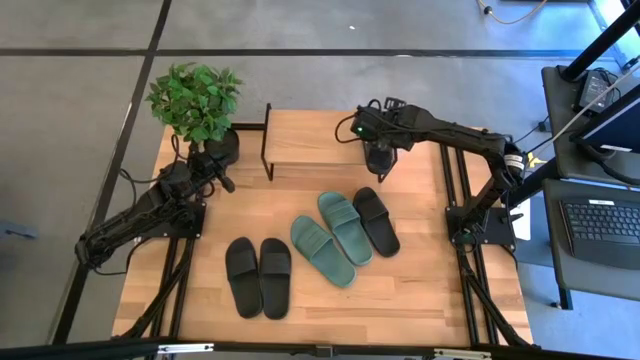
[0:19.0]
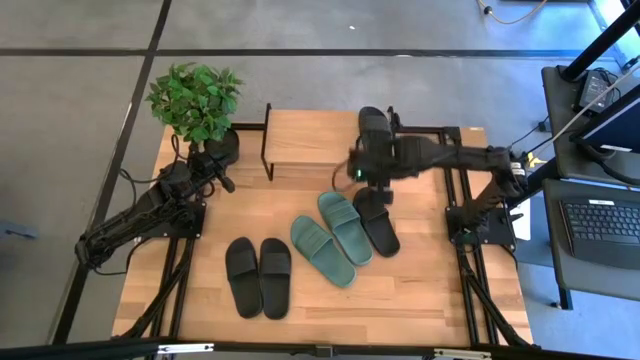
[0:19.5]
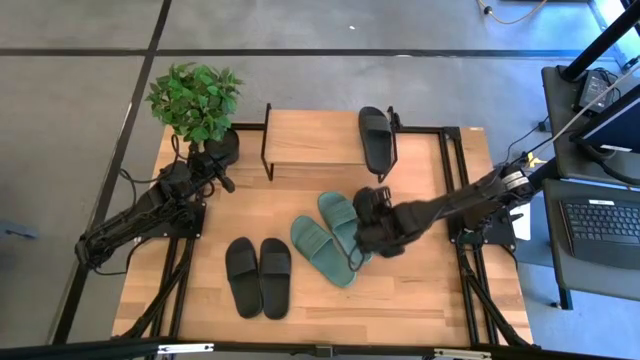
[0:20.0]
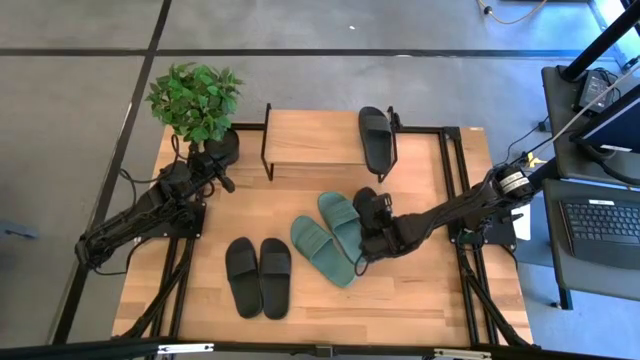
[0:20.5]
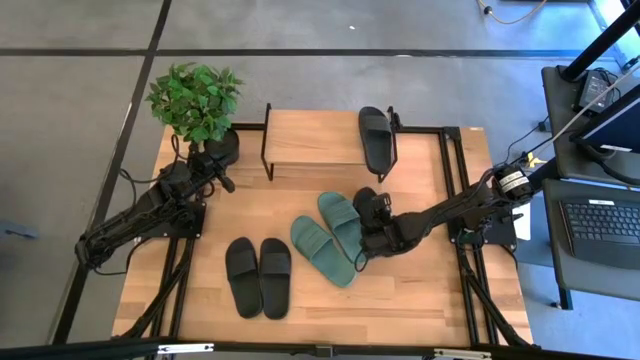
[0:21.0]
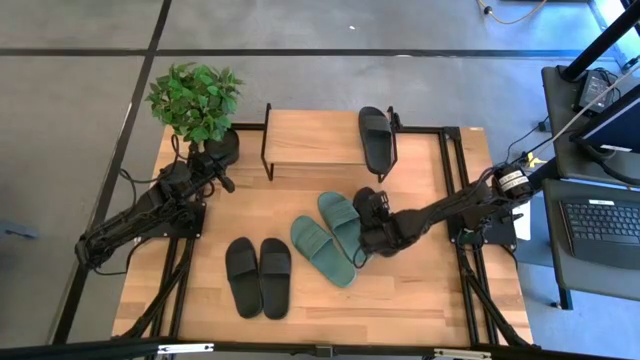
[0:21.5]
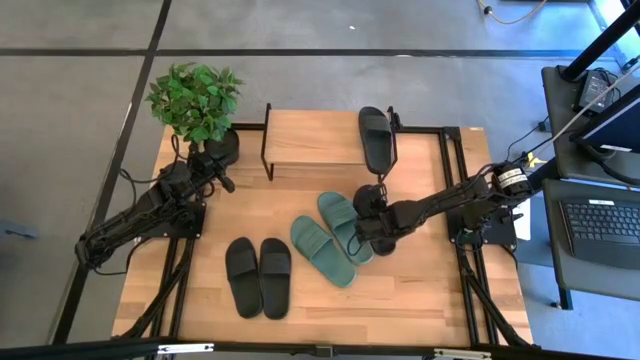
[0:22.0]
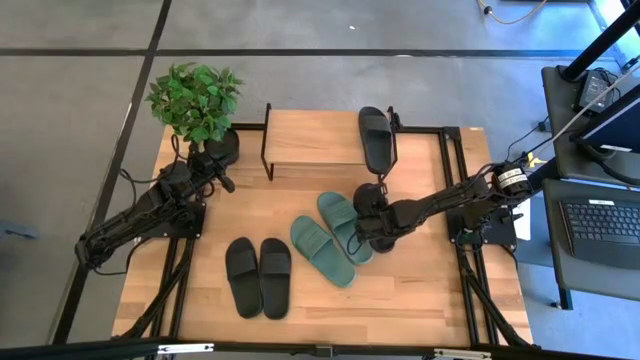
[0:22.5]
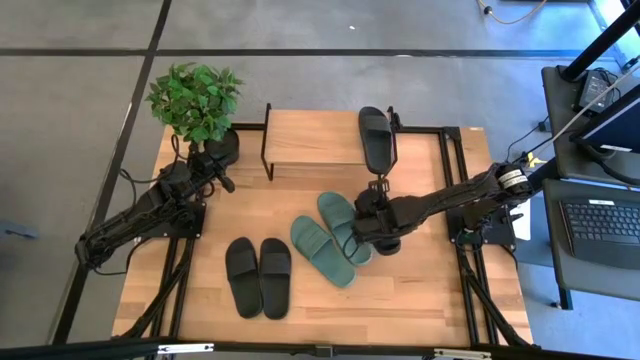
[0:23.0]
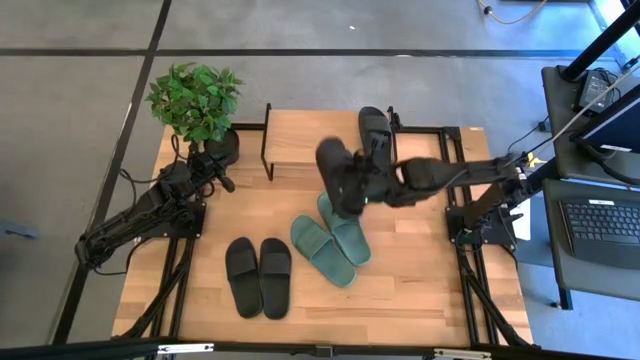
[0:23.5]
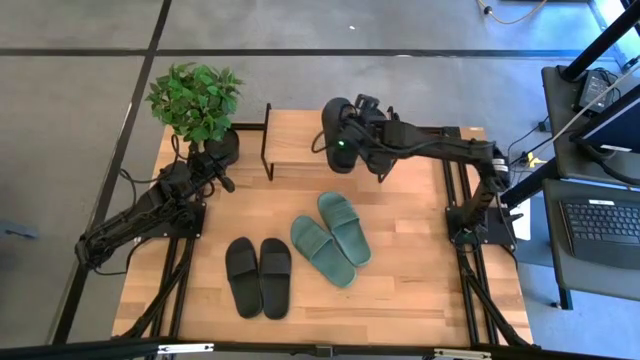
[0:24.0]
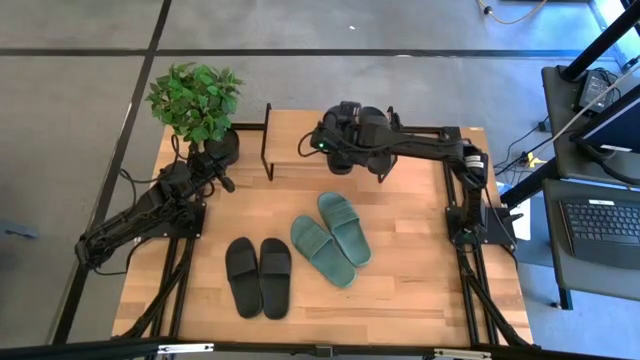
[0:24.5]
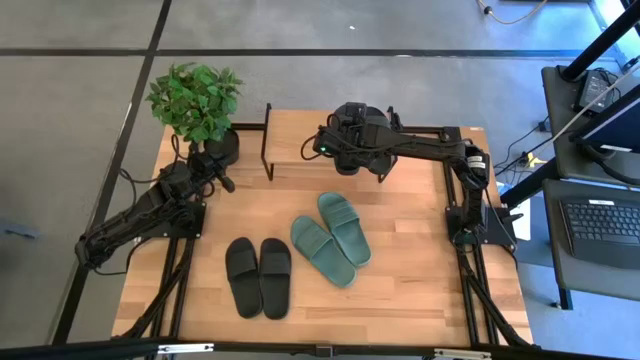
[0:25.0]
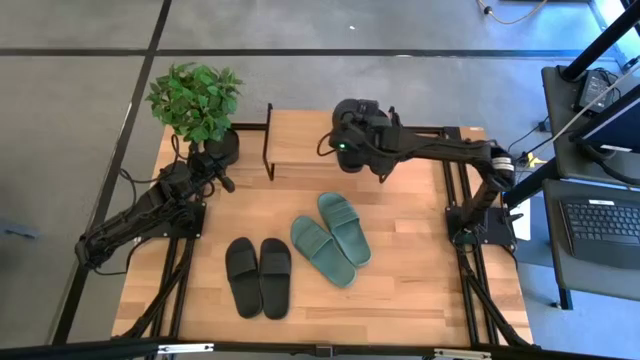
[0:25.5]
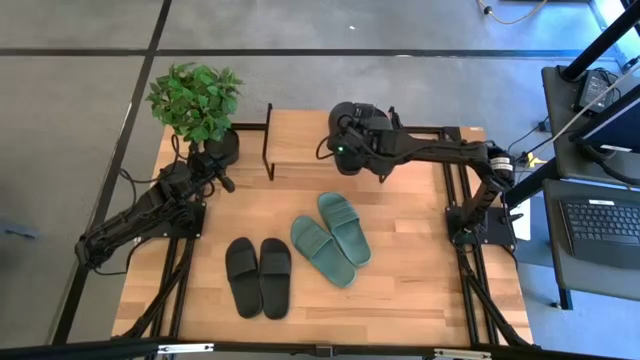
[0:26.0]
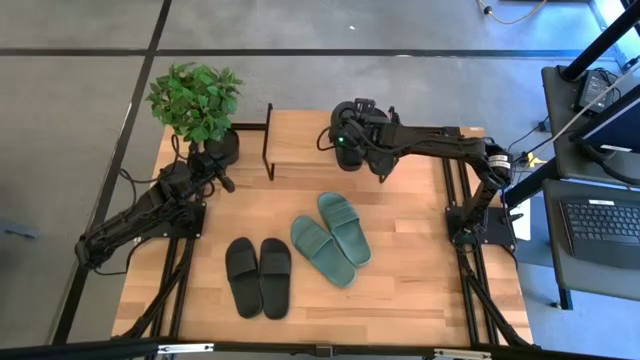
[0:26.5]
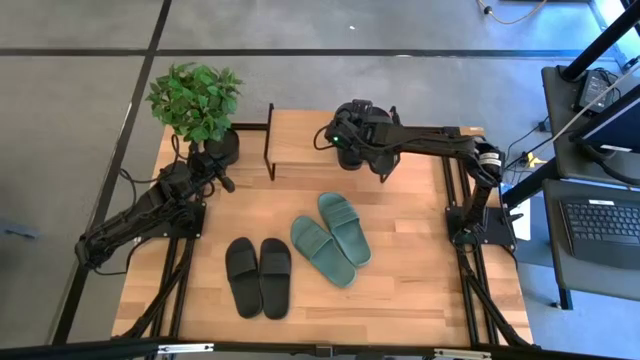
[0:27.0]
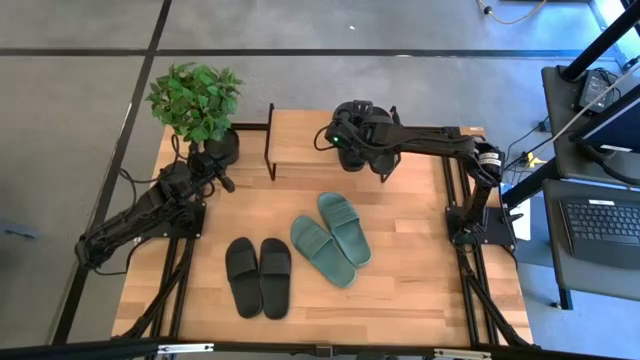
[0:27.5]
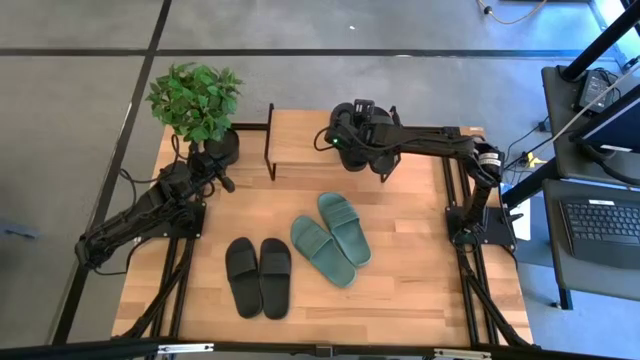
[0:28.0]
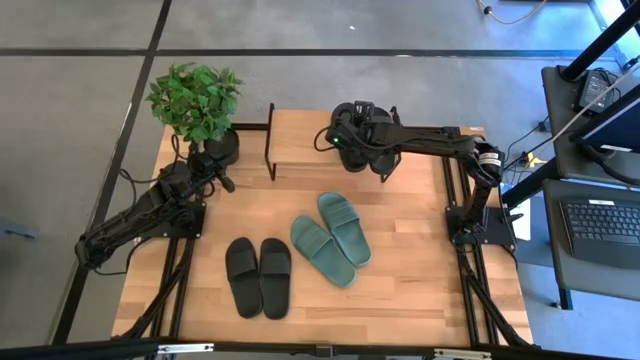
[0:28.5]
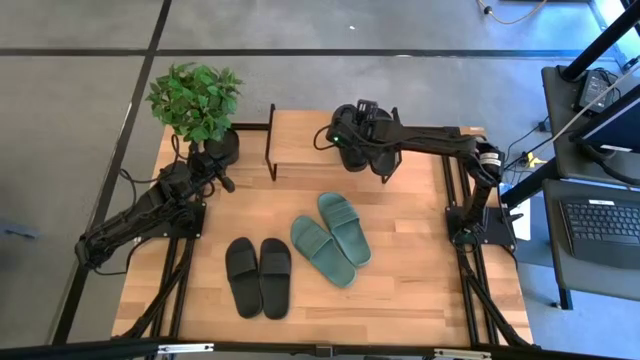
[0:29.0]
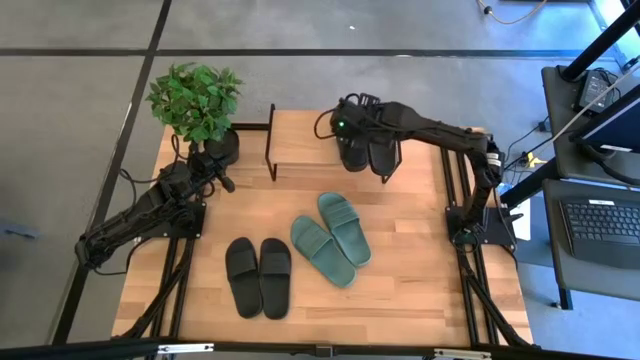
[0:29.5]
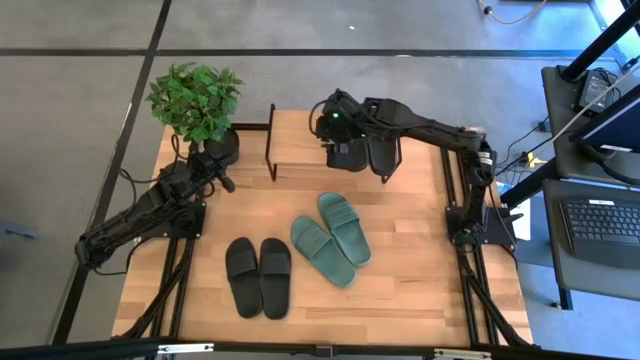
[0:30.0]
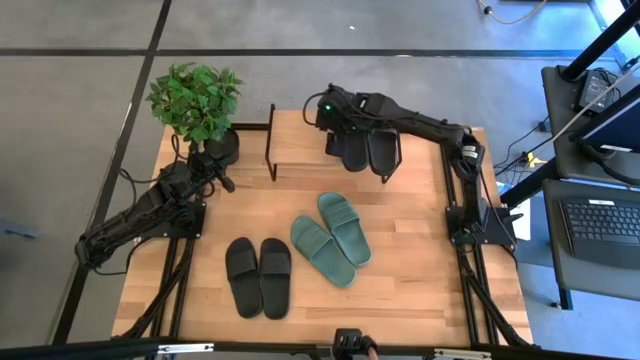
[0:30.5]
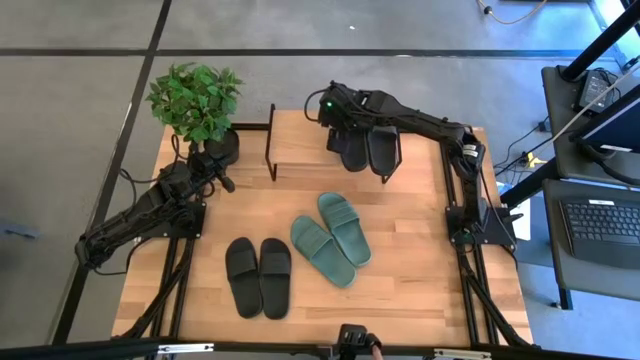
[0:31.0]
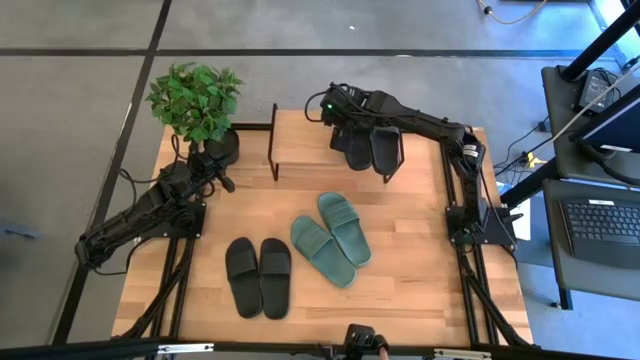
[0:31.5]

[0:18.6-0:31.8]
Task: Pick and place slides into the shelf
Put the black slide on the shelf

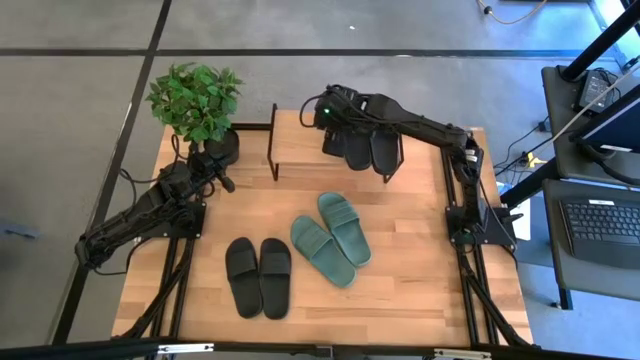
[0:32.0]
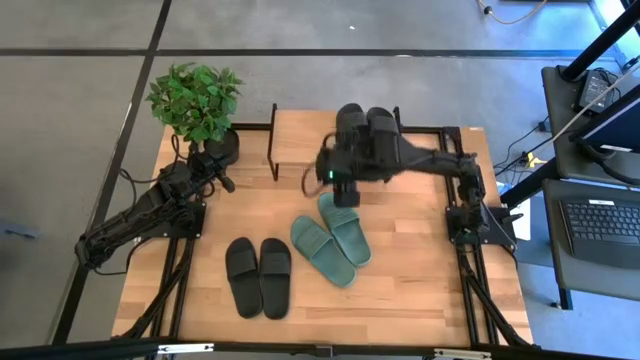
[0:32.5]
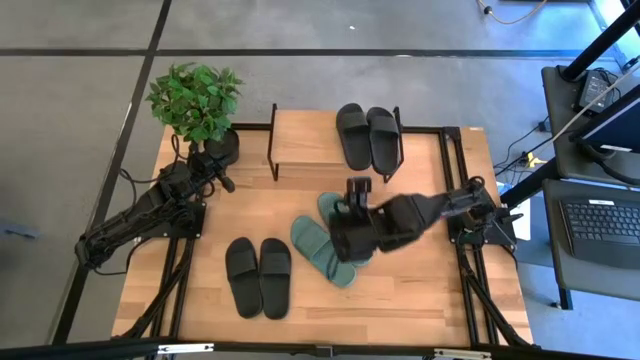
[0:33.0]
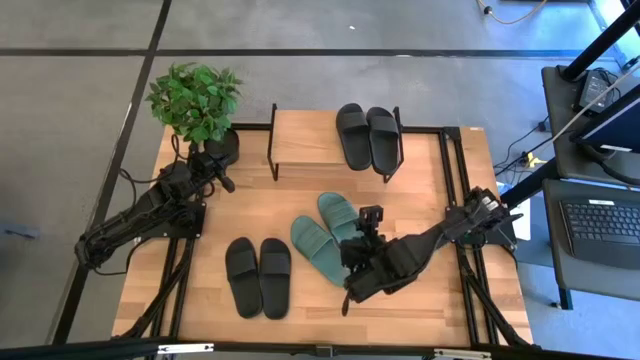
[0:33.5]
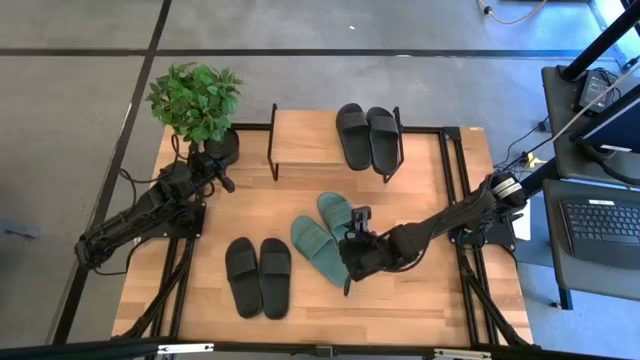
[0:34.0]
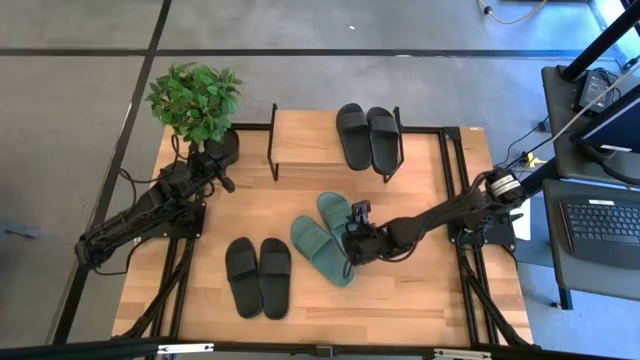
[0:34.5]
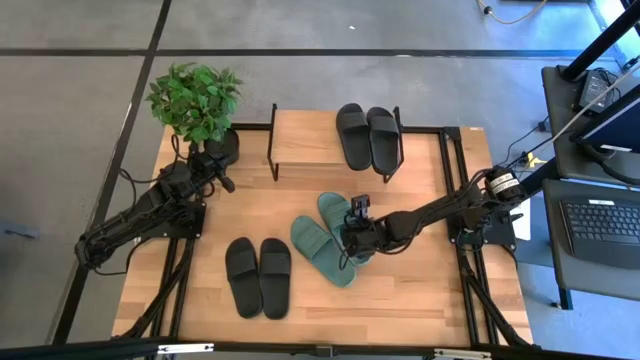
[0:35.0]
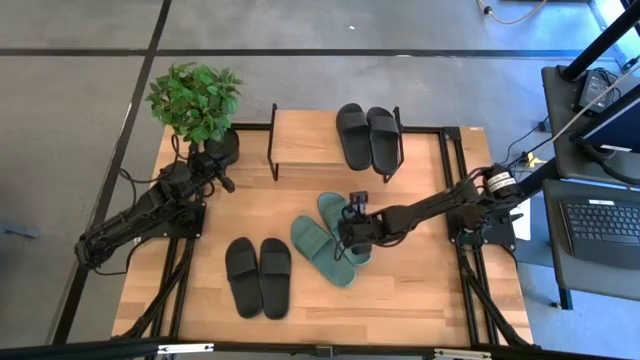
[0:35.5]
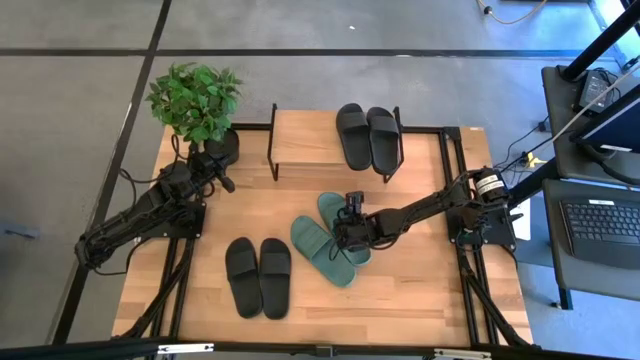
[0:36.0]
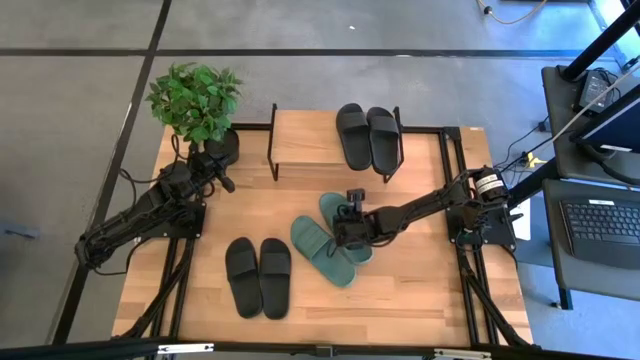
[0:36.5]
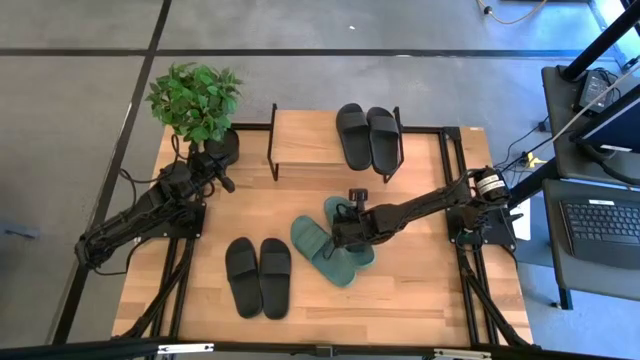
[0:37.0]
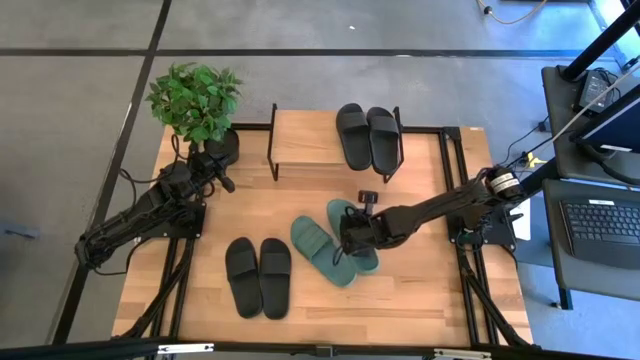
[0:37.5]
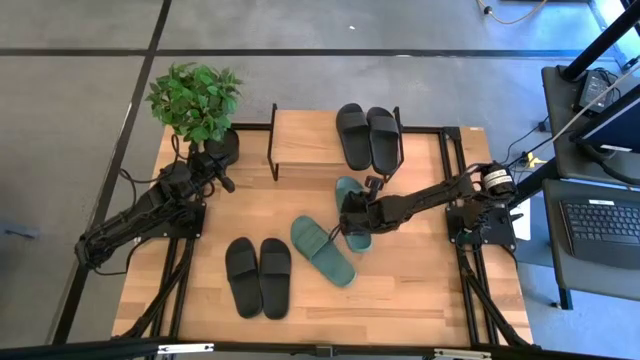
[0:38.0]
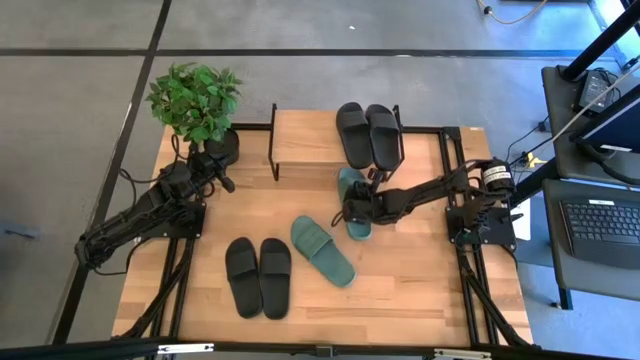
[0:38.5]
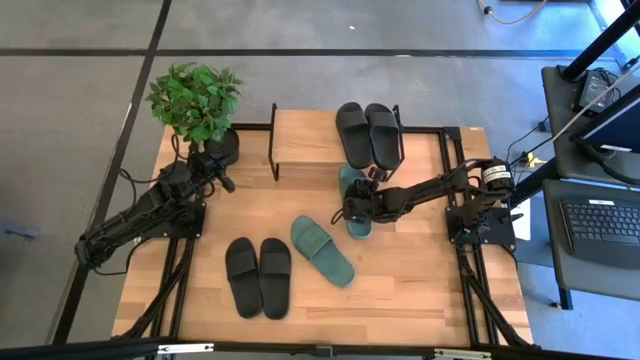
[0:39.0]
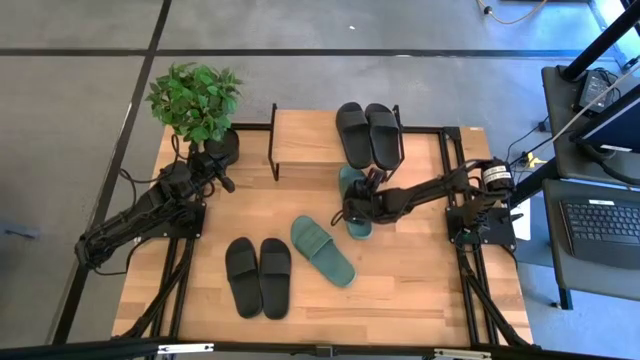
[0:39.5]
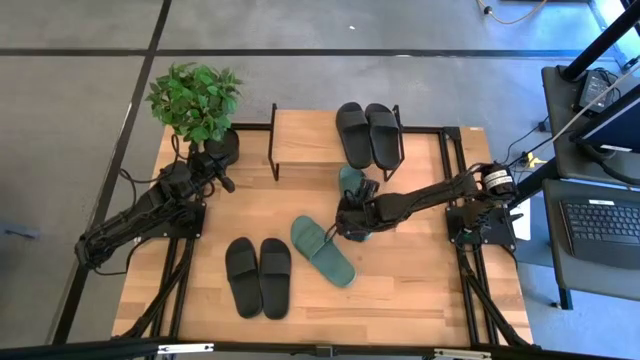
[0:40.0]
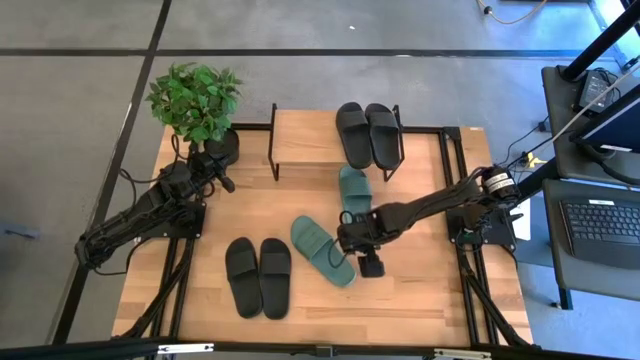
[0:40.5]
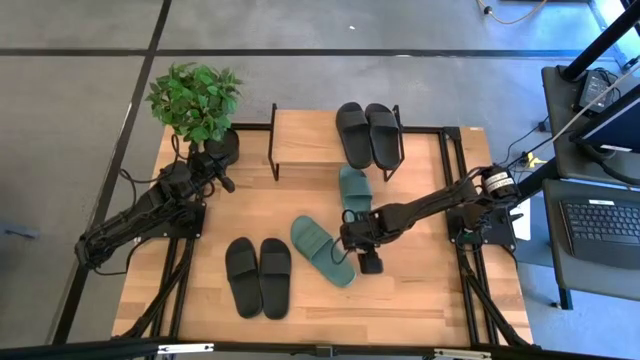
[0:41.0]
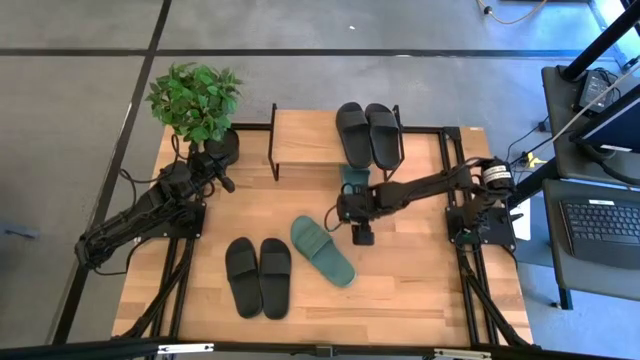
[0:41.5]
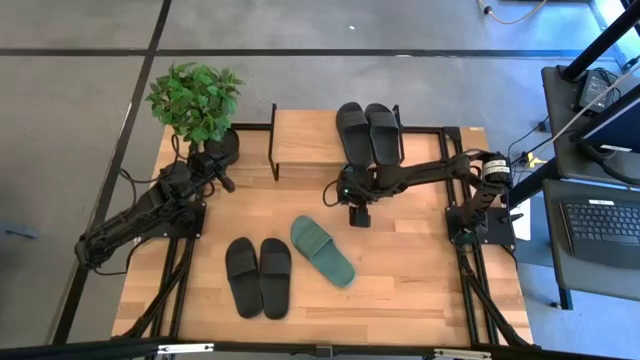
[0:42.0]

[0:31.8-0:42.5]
Put the green slide under the shelf
